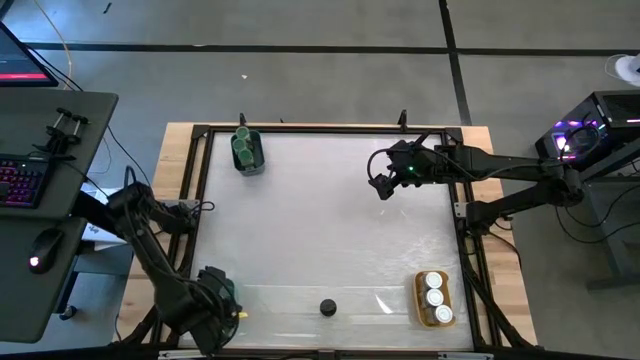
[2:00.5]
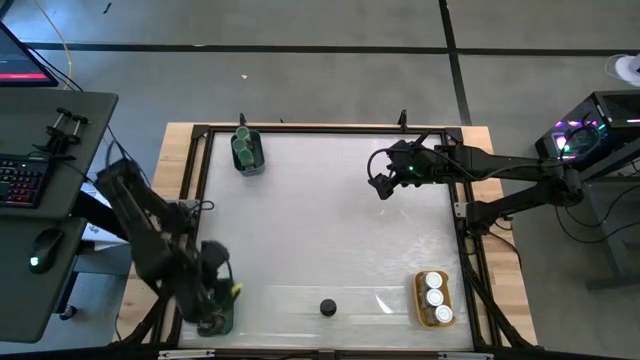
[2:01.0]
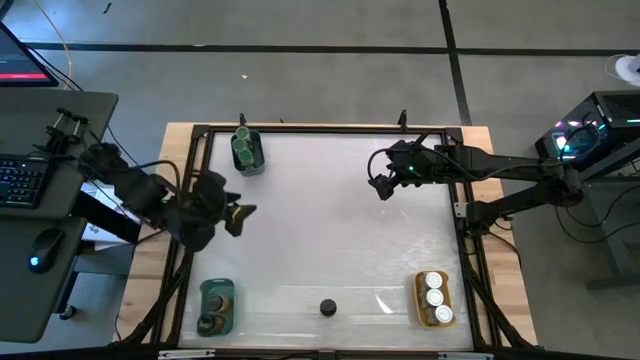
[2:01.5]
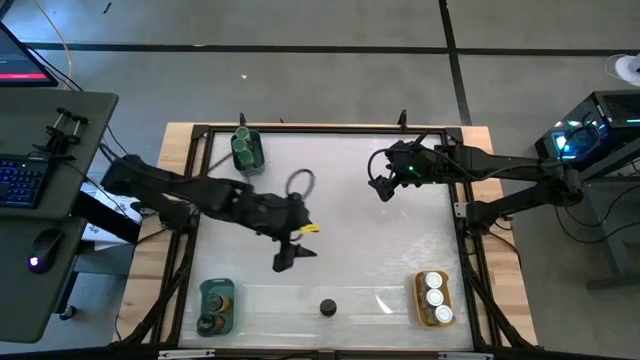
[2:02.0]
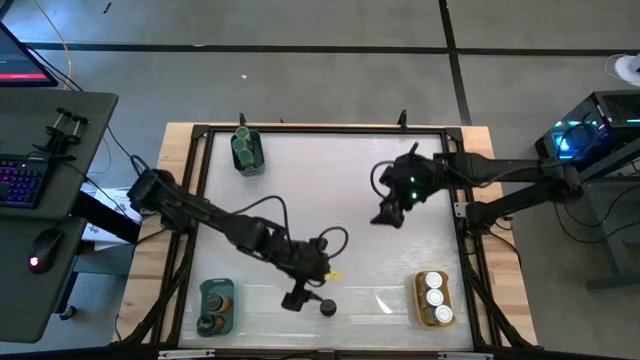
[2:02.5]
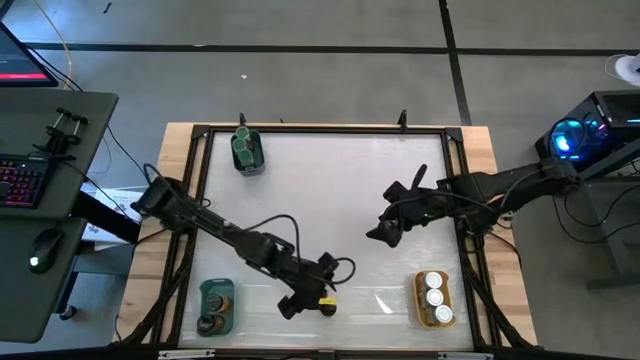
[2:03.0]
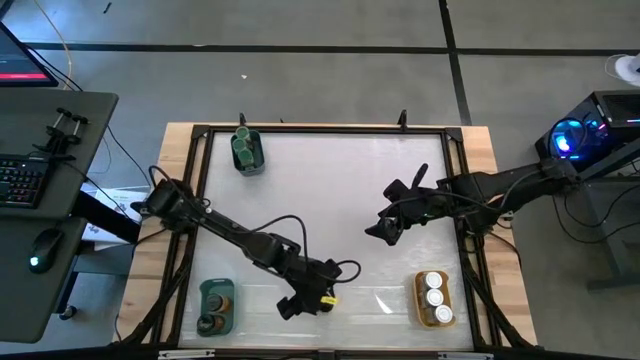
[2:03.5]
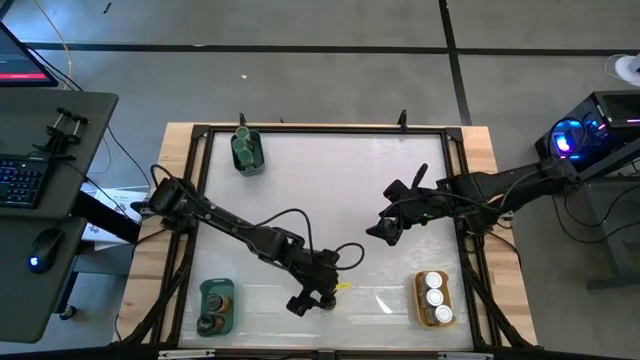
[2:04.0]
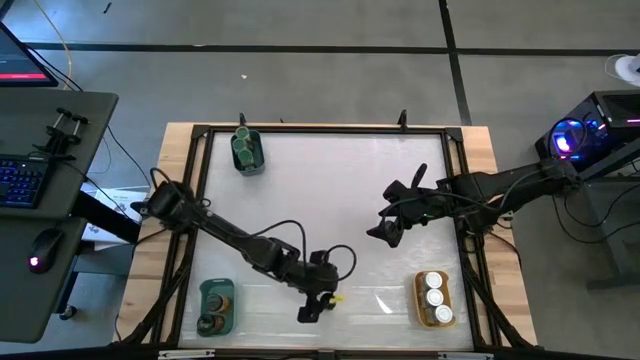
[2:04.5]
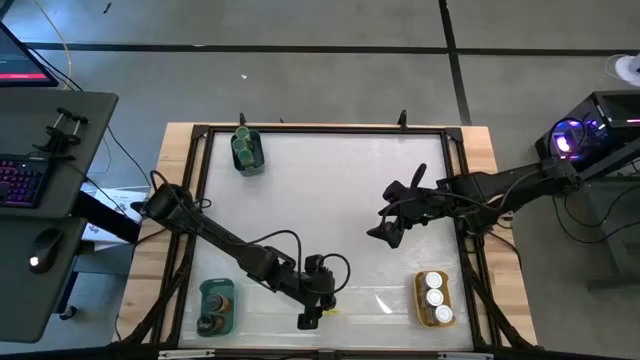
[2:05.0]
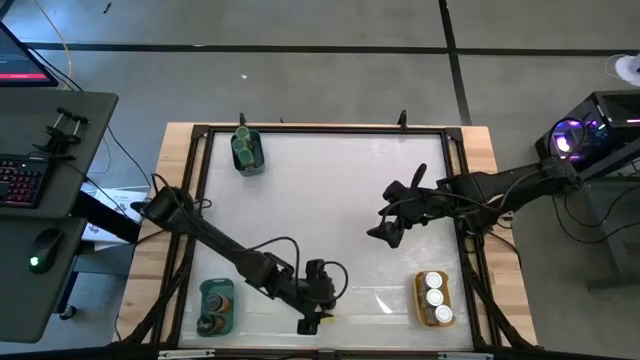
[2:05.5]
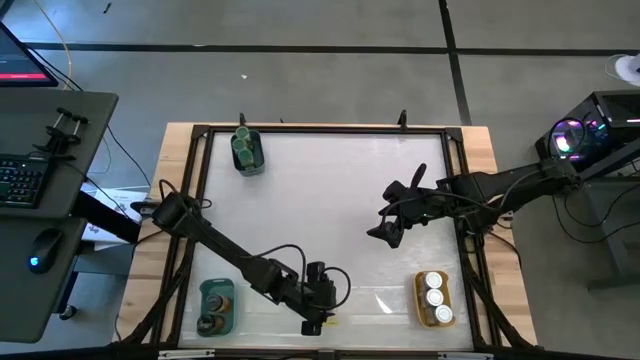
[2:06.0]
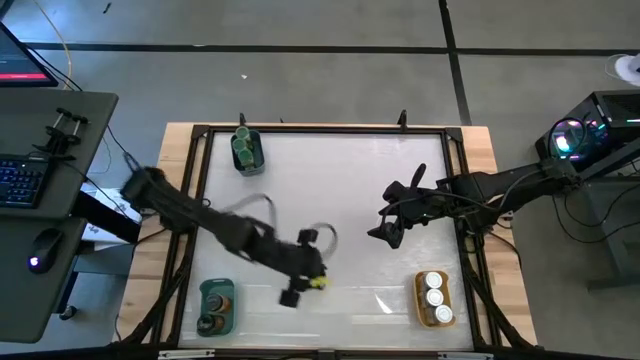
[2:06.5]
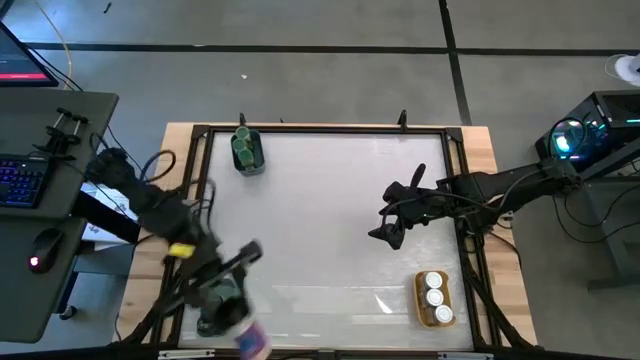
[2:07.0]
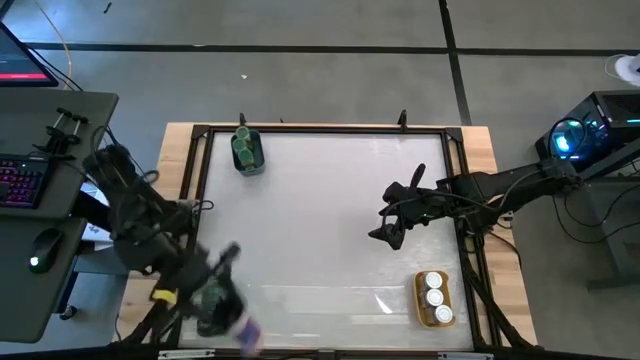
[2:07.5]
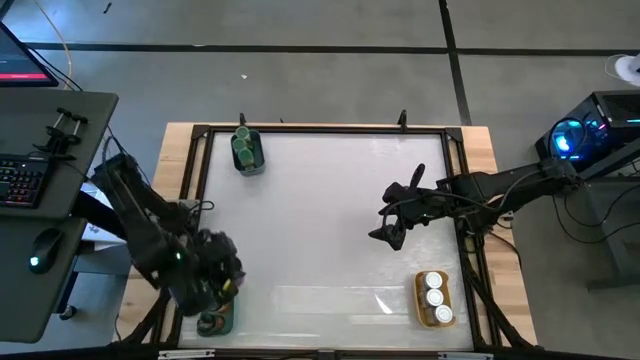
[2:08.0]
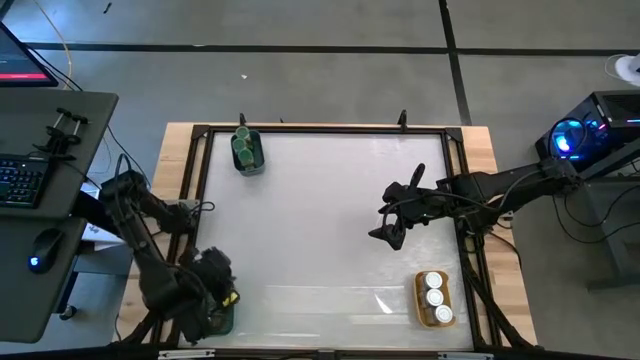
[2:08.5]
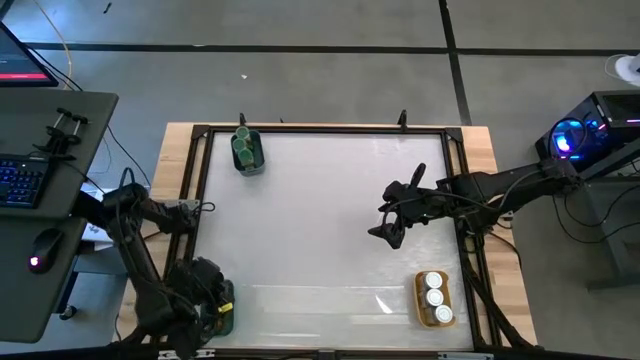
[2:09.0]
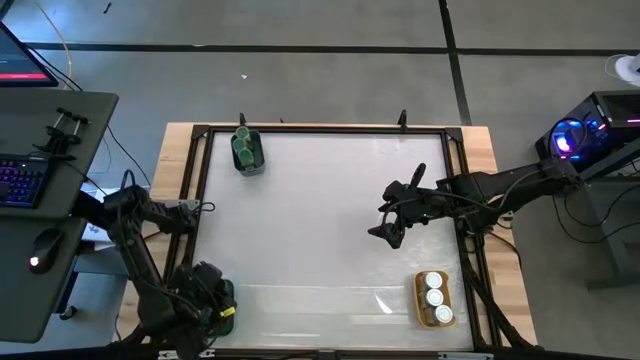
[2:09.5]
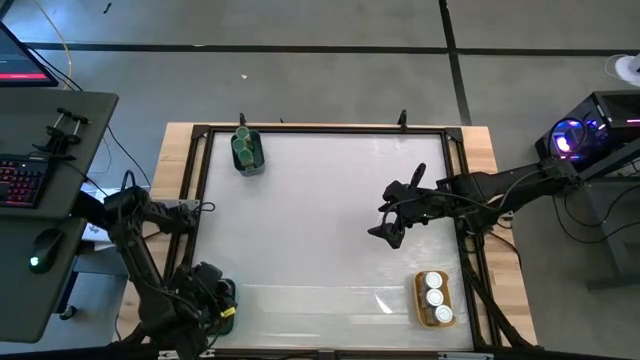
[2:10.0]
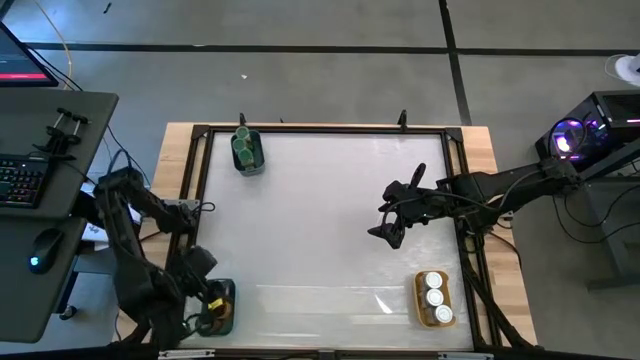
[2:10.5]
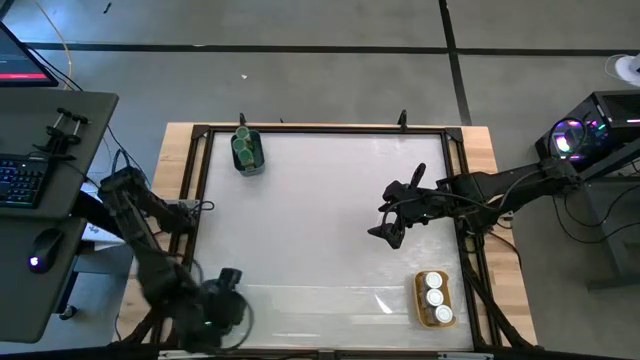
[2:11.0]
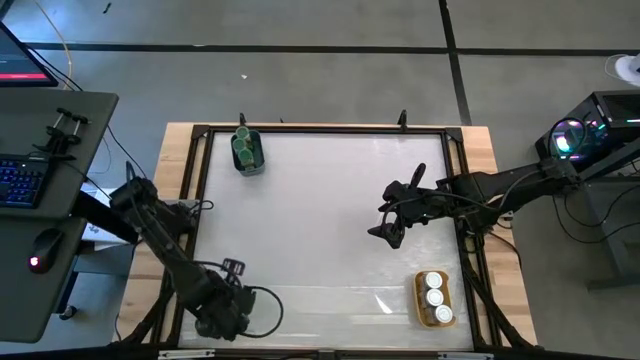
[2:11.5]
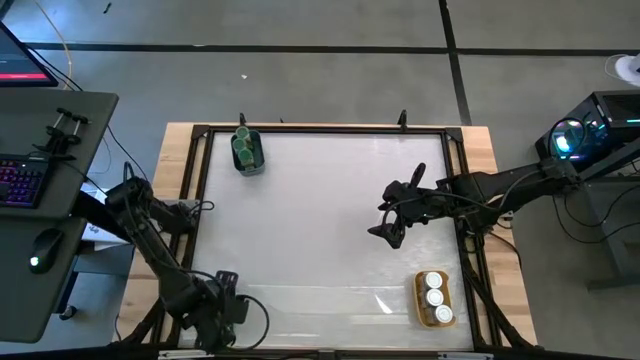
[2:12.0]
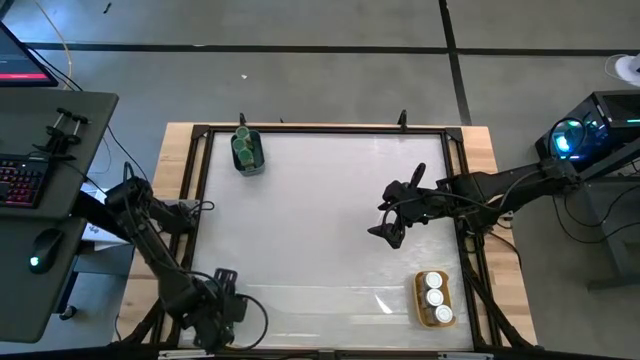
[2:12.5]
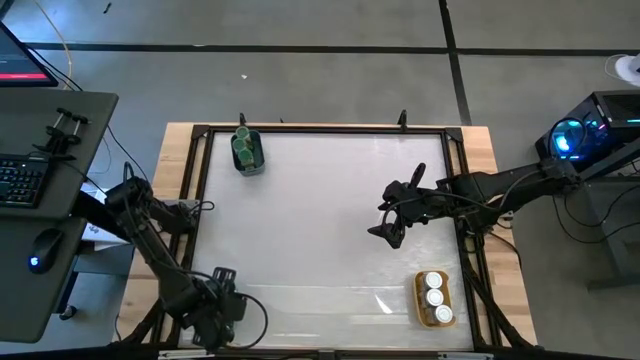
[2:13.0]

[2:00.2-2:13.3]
Task: Sort spices by type
Put the black seasoning bottle into the green bin

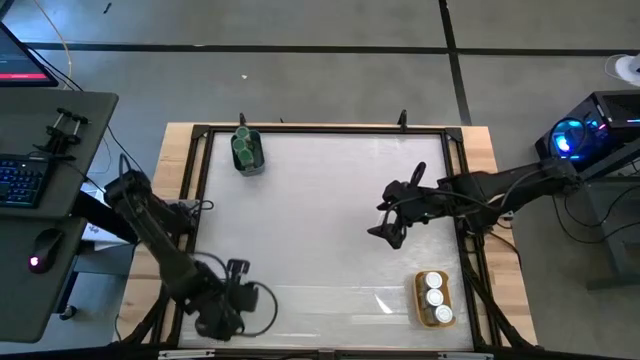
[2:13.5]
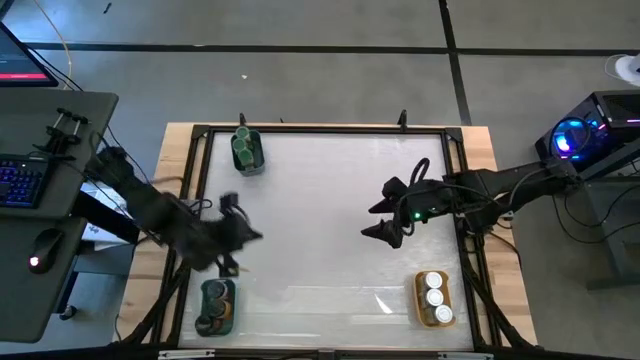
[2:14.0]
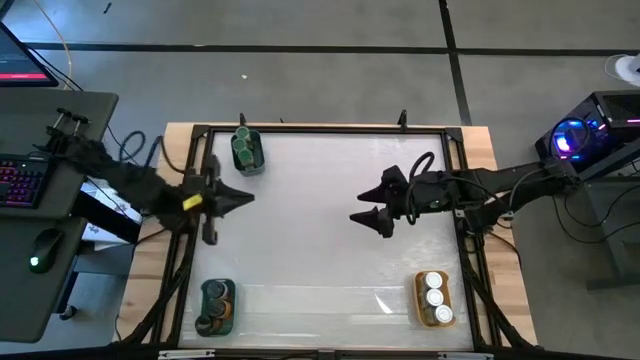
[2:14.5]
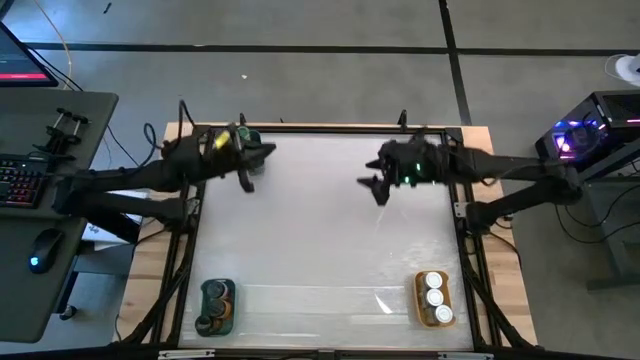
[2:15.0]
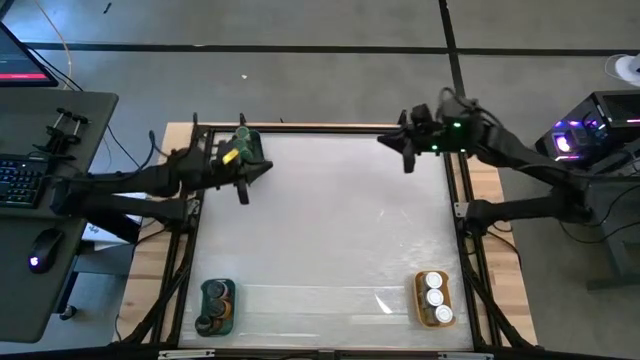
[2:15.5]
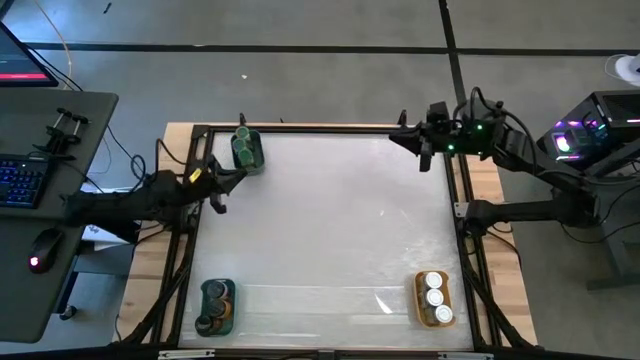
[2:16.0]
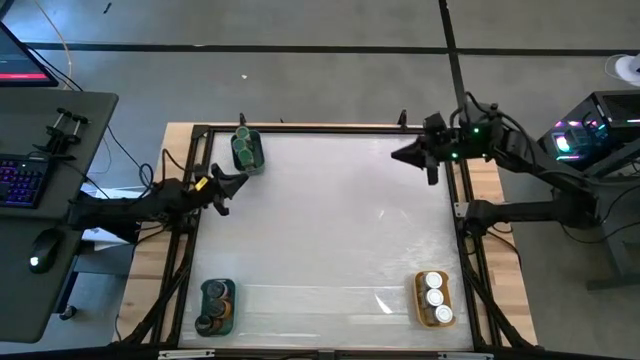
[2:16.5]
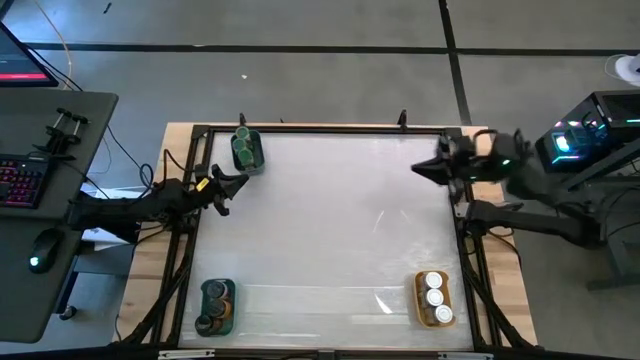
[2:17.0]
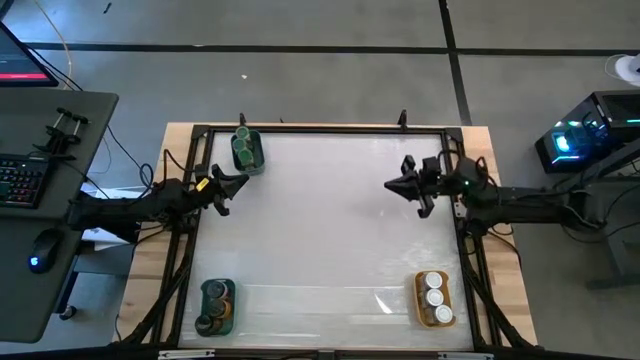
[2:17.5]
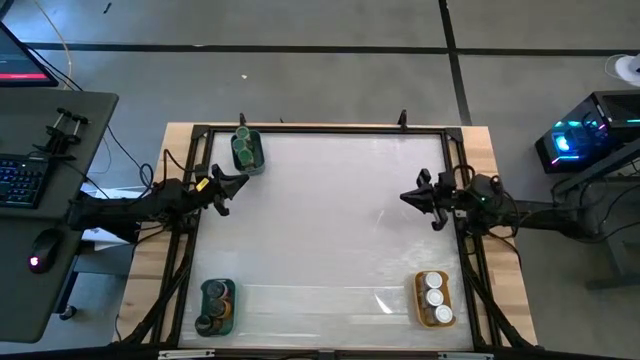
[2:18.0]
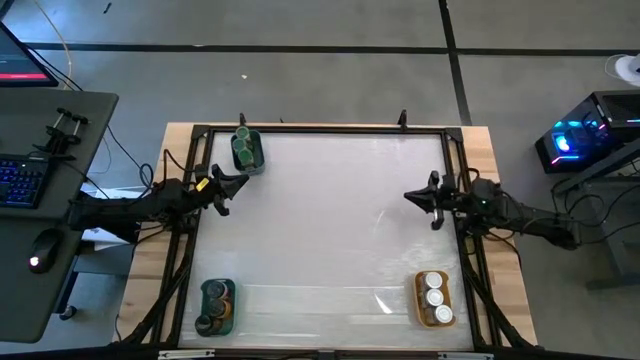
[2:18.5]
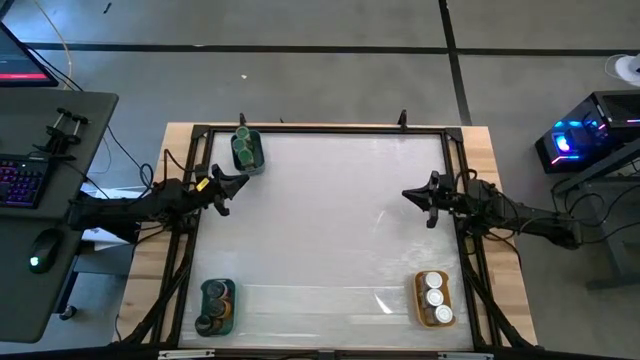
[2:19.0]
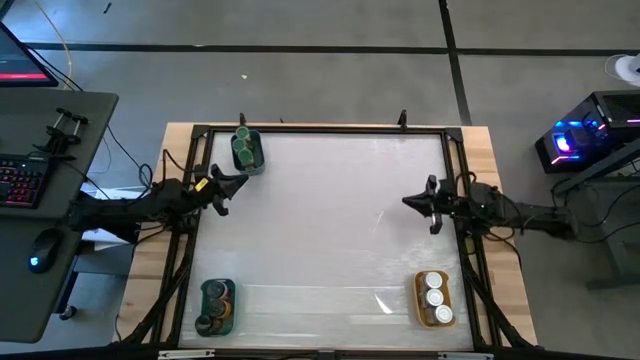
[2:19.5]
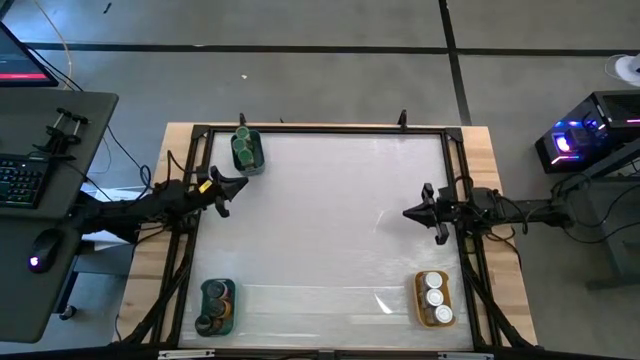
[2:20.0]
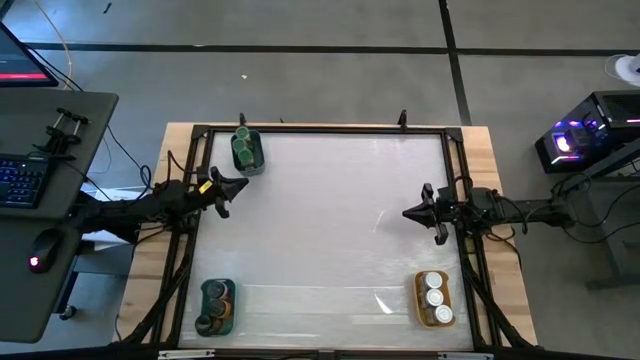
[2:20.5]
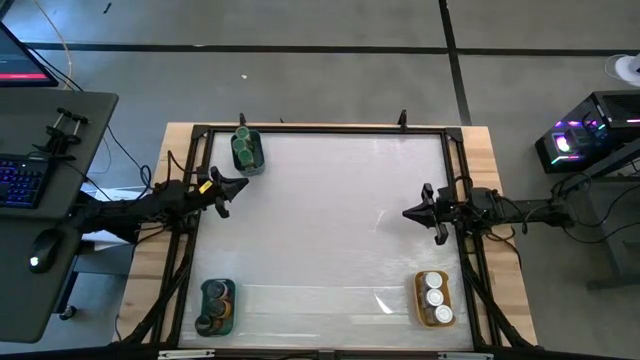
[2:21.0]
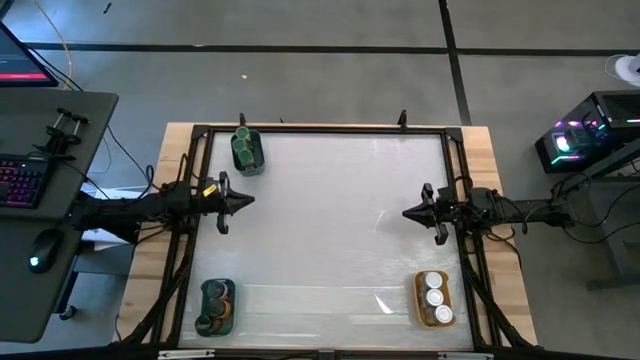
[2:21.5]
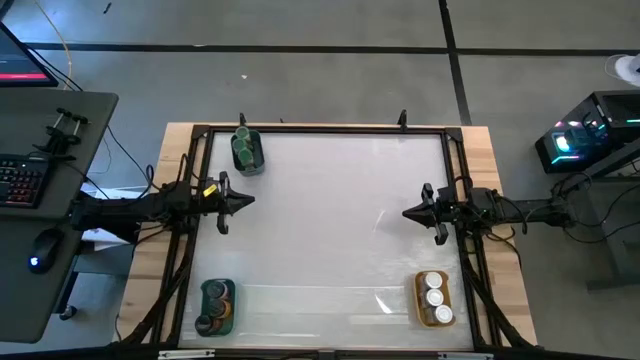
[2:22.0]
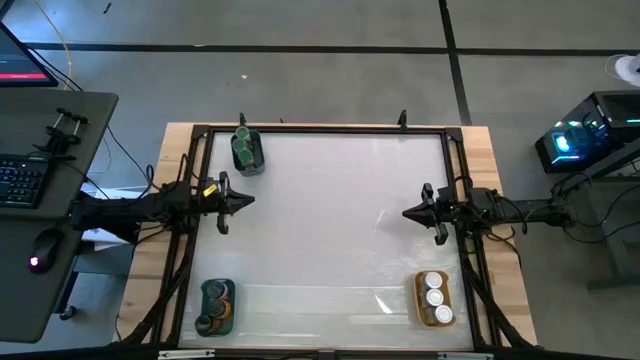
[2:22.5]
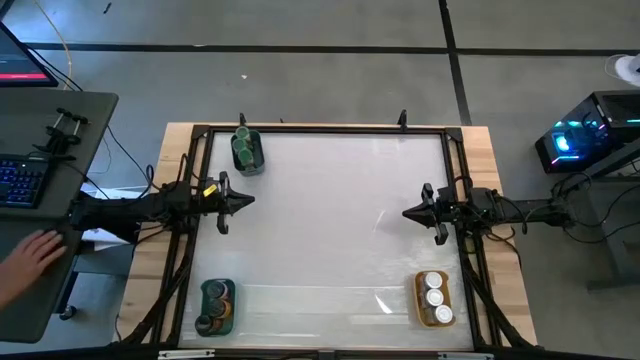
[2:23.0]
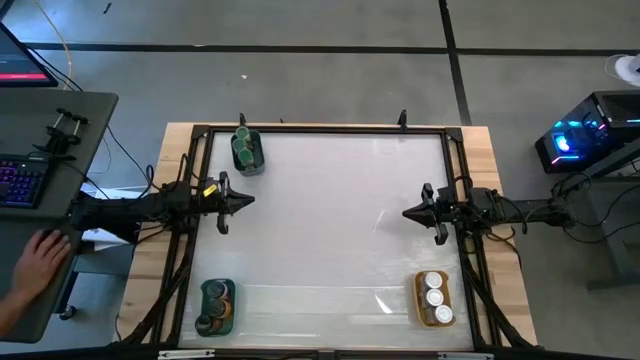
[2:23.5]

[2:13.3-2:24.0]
Return to Home Position
